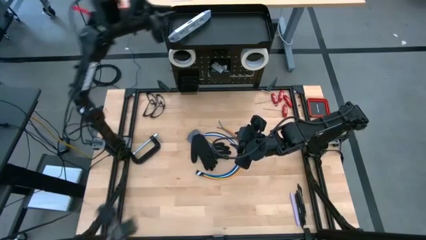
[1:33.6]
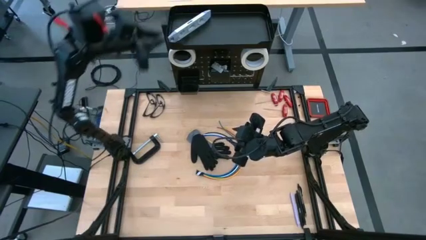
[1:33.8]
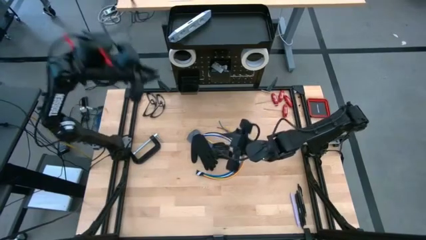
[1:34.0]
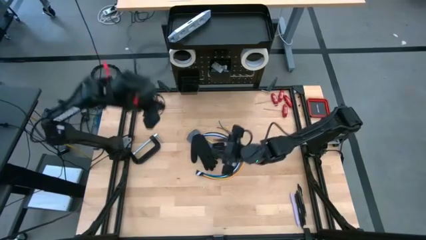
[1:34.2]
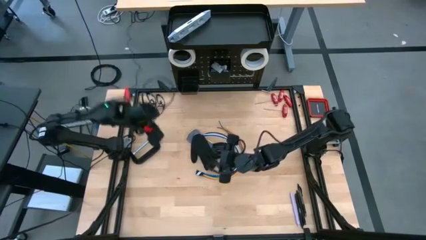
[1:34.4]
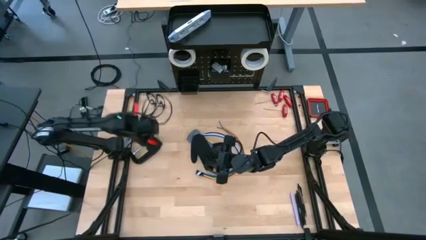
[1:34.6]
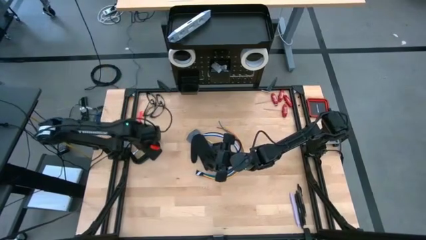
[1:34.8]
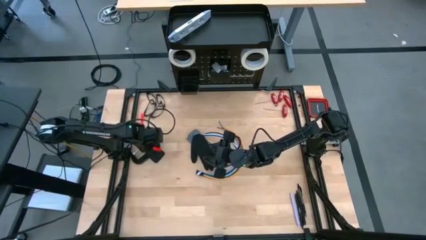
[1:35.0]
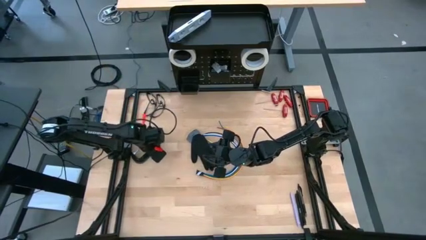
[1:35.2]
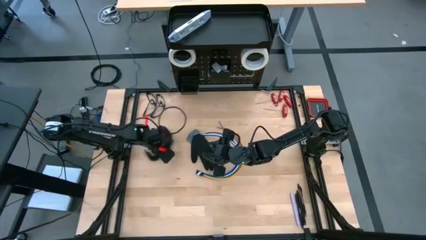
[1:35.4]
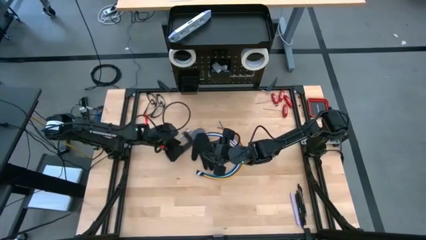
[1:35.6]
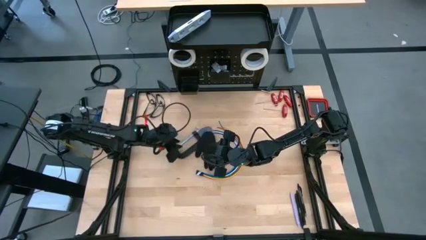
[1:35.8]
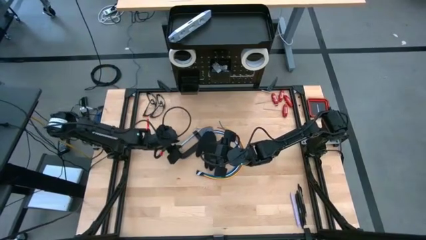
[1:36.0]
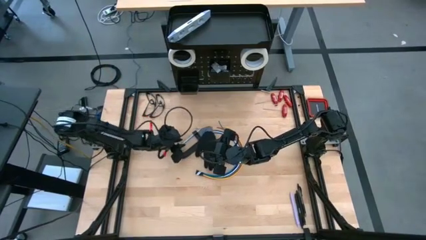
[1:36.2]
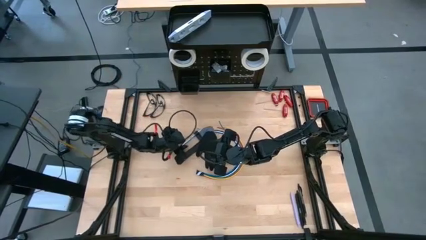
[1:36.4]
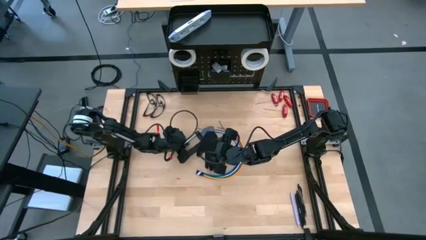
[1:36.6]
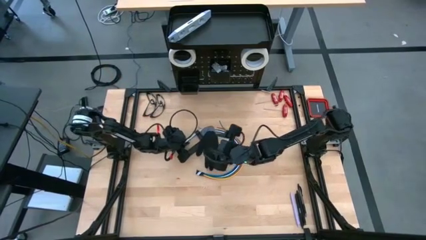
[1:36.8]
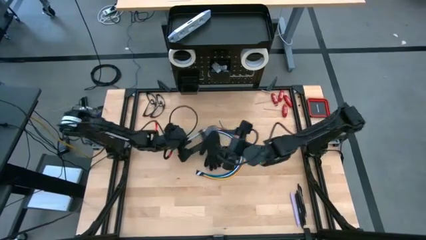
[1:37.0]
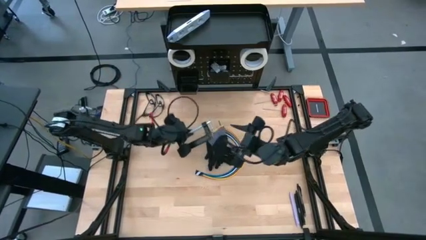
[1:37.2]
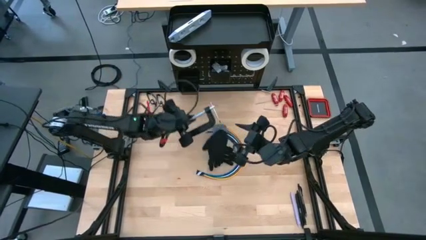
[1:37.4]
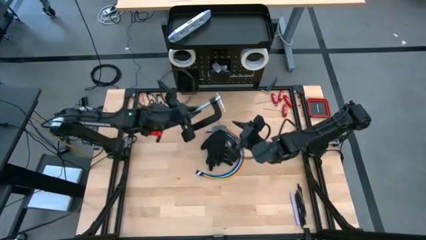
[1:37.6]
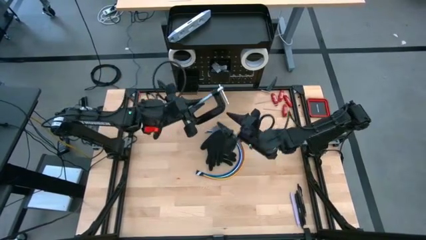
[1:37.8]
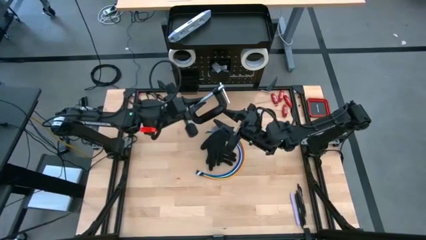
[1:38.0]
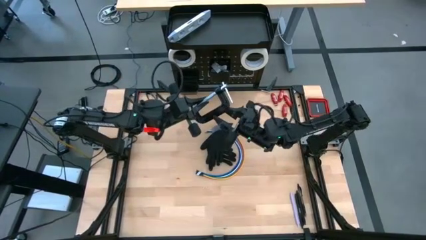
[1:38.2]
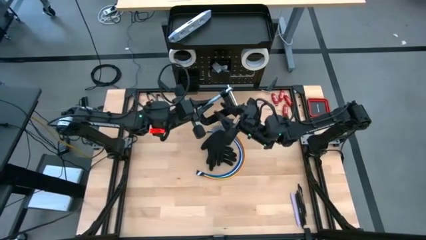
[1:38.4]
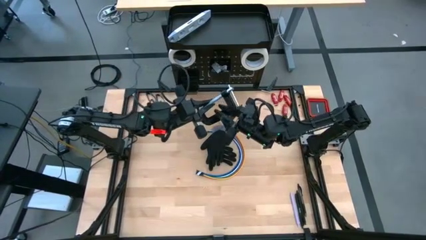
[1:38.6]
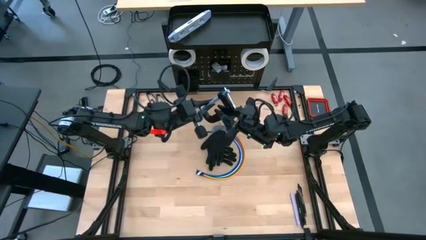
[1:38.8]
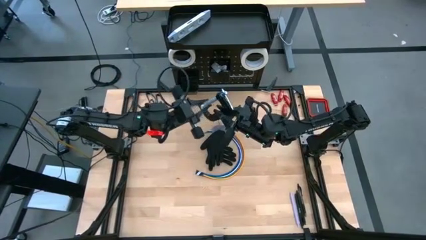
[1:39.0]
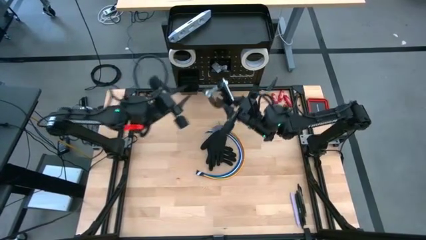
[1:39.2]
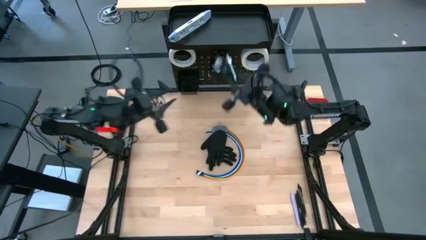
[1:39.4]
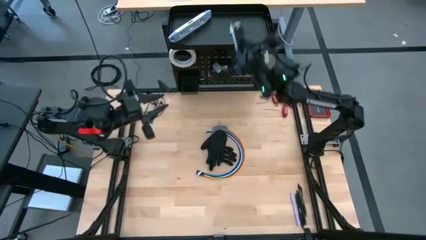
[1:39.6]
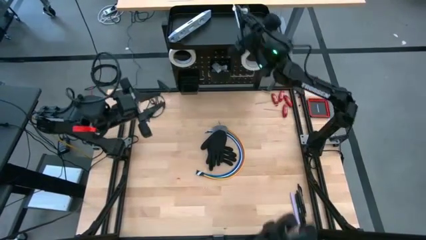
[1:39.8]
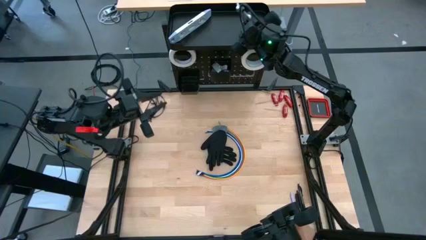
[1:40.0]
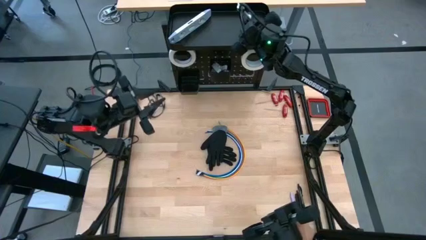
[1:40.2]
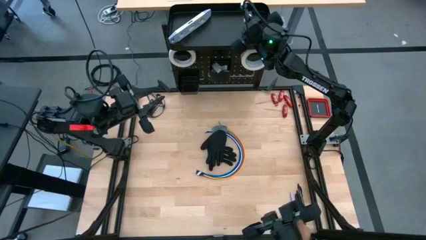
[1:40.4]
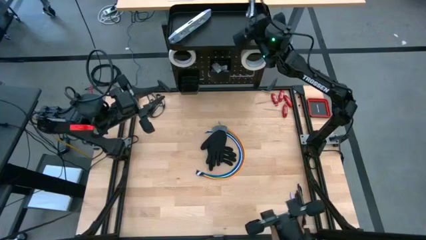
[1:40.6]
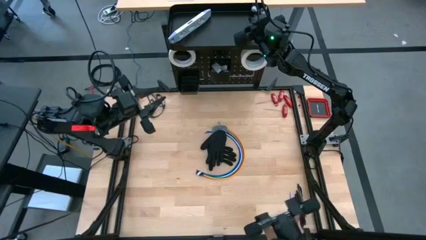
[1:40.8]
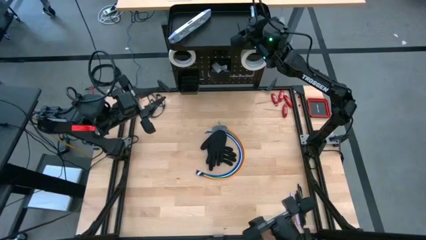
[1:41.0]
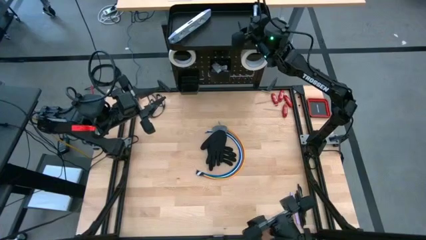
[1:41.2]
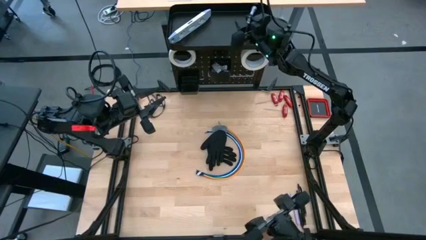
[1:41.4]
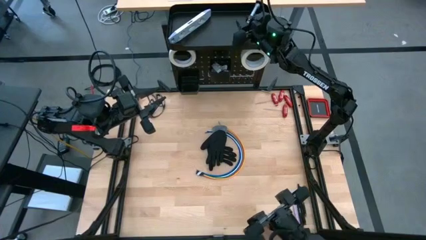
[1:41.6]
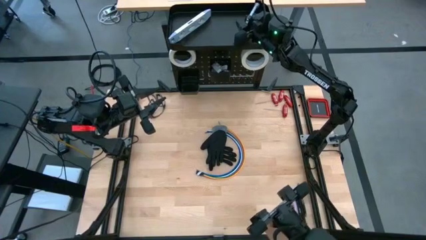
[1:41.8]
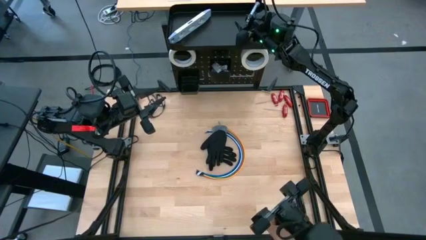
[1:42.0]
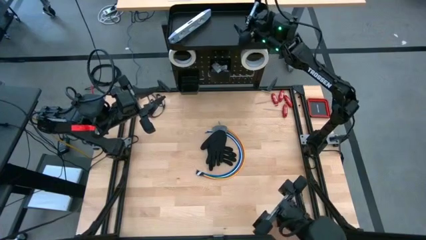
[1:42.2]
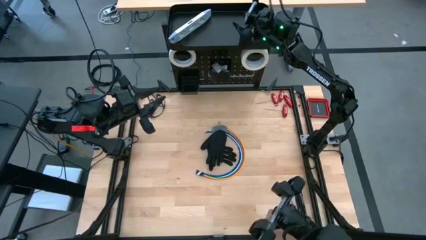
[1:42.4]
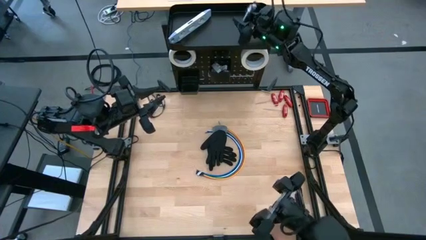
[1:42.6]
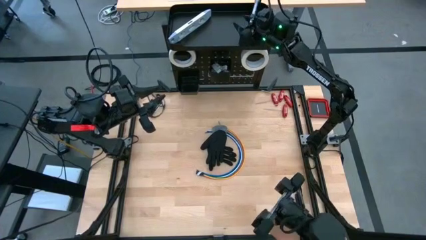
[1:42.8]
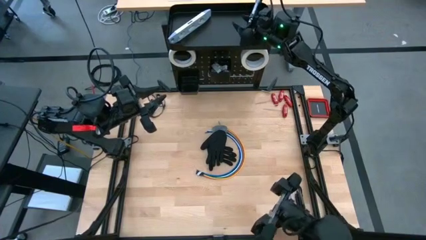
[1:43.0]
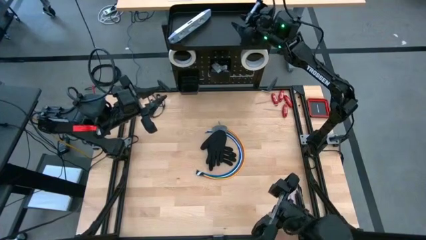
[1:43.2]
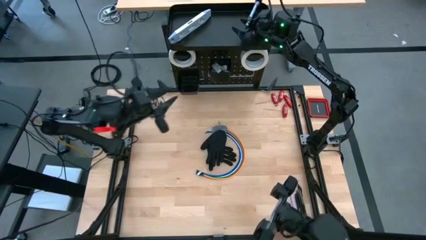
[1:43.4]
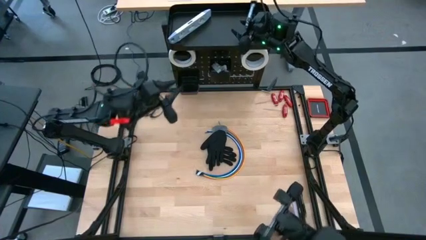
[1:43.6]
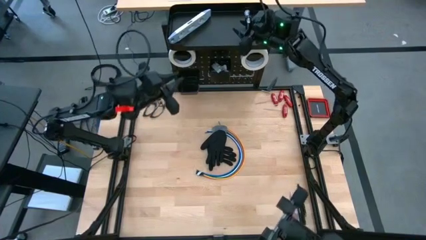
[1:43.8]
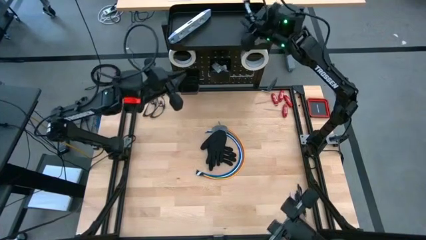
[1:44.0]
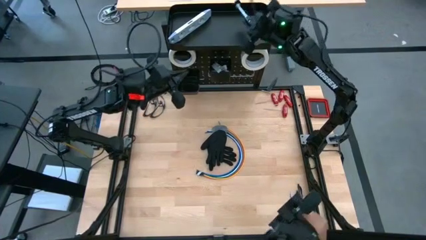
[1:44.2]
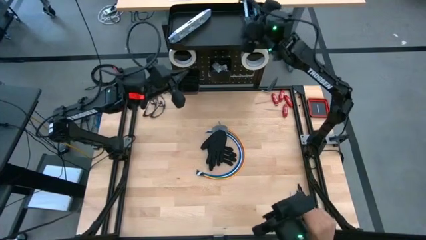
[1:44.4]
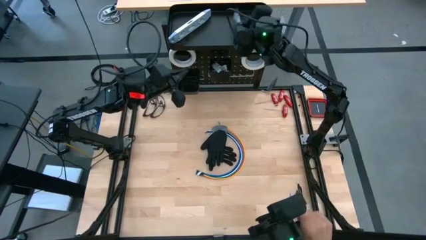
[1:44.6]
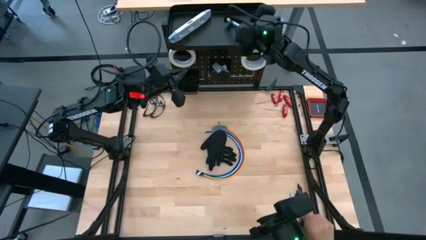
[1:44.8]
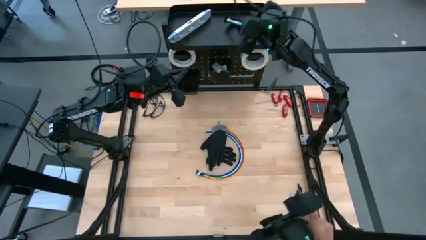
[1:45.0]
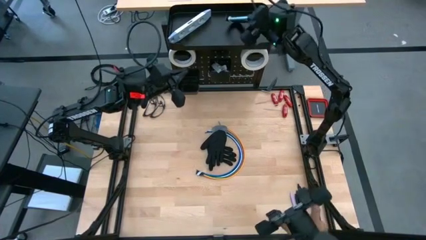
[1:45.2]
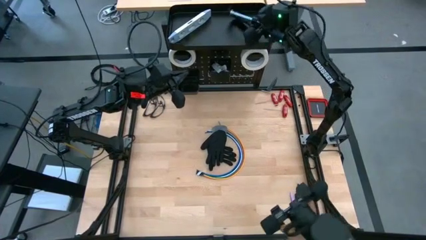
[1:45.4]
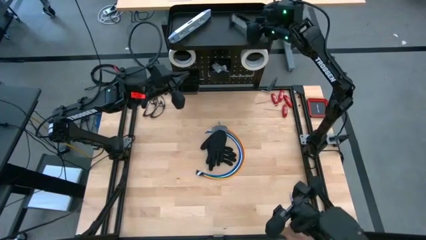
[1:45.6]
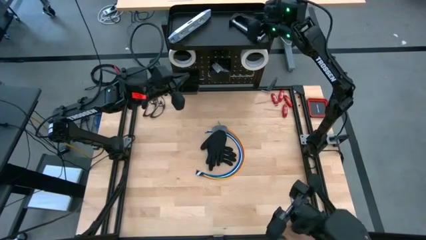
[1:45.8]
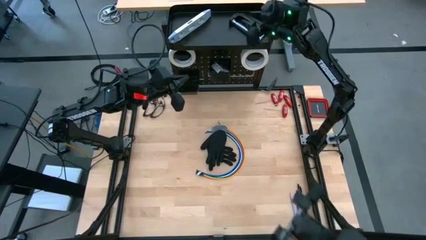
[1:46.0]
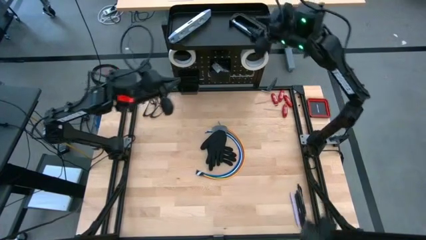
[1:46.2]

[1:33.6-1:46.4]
Task: Hang tools onto peg board
Put the black clamp on the peg board

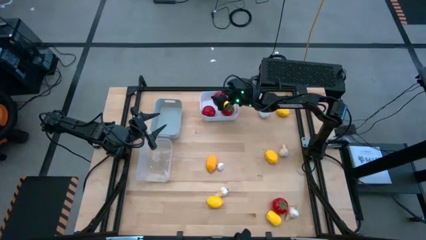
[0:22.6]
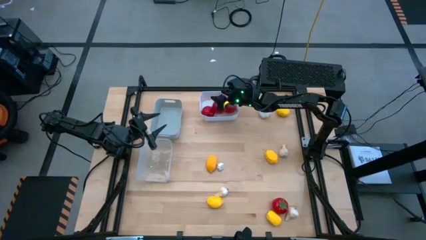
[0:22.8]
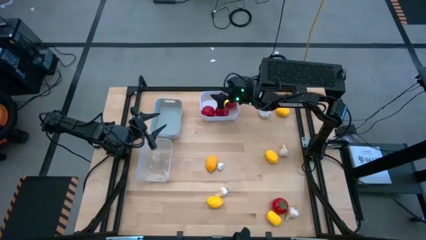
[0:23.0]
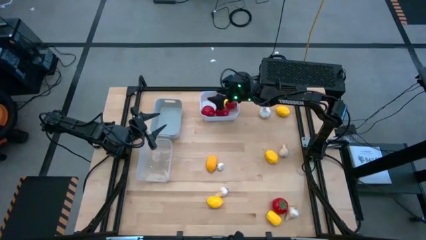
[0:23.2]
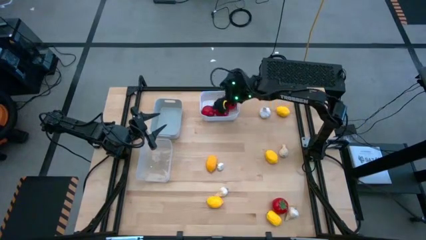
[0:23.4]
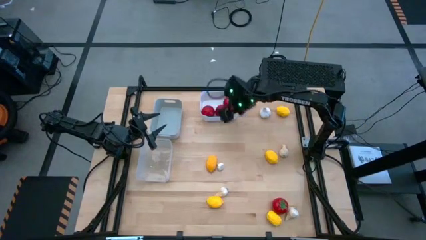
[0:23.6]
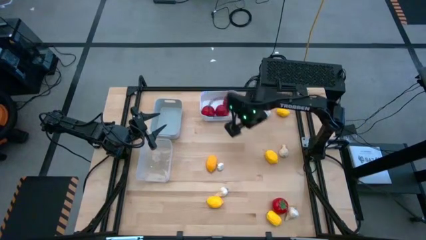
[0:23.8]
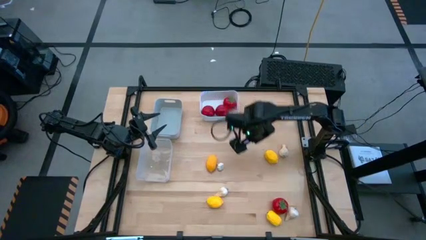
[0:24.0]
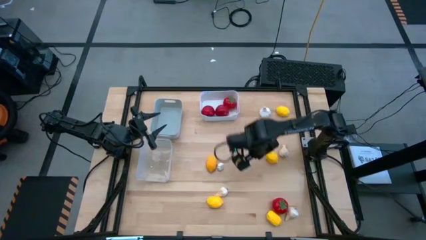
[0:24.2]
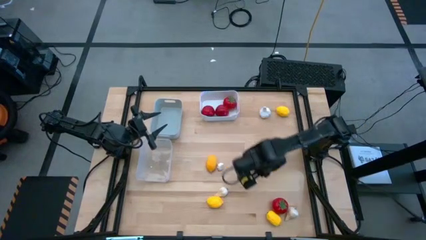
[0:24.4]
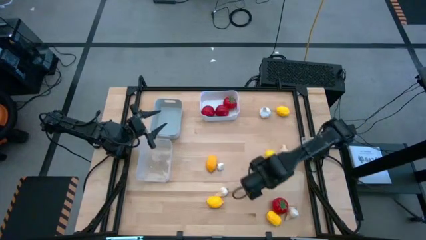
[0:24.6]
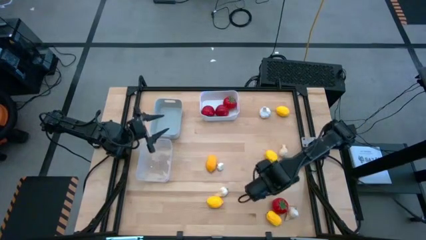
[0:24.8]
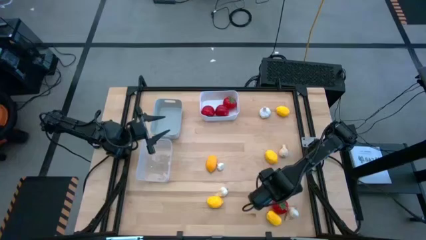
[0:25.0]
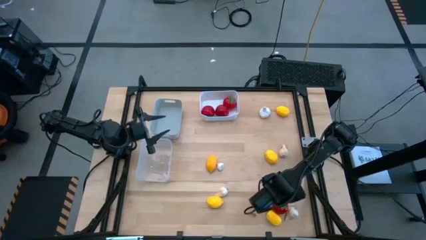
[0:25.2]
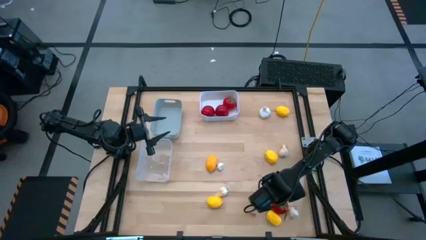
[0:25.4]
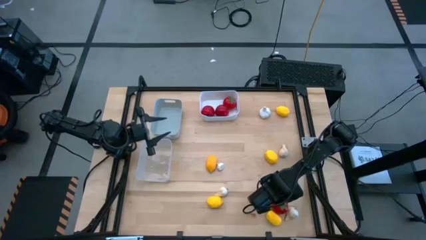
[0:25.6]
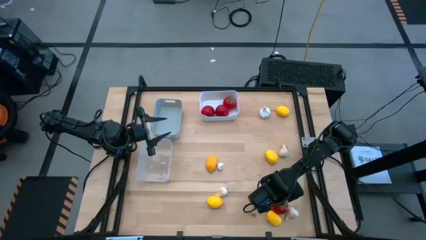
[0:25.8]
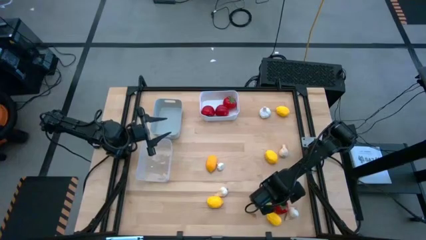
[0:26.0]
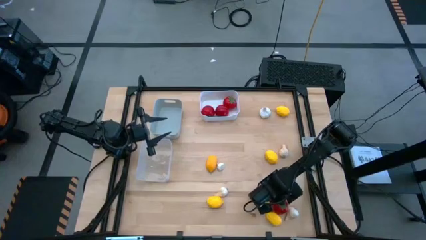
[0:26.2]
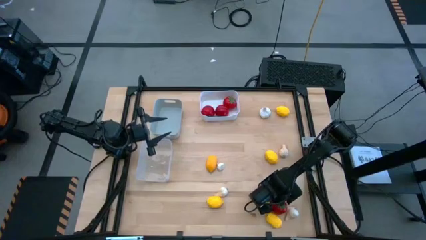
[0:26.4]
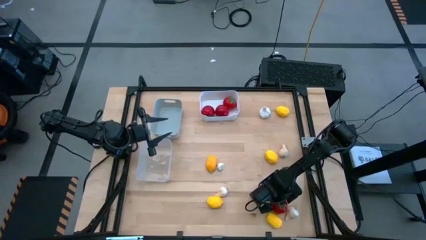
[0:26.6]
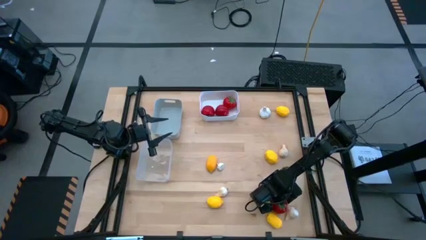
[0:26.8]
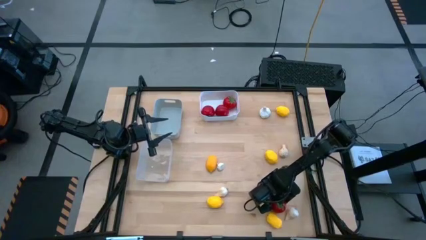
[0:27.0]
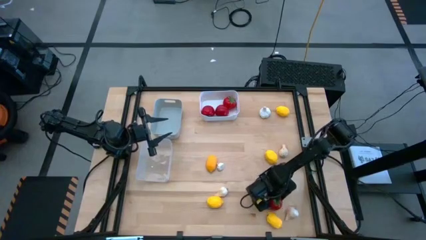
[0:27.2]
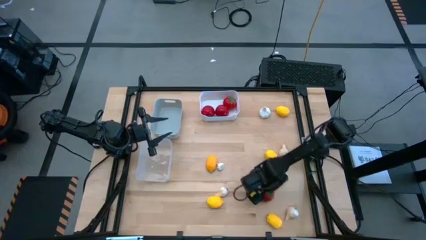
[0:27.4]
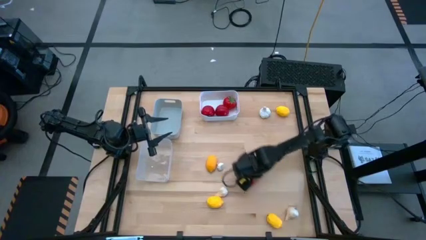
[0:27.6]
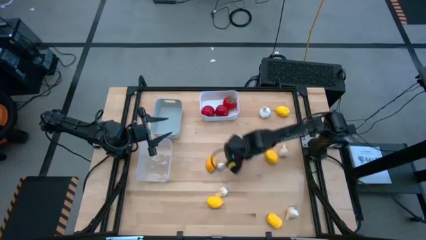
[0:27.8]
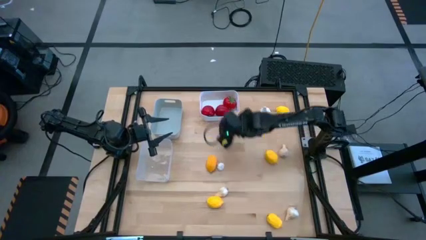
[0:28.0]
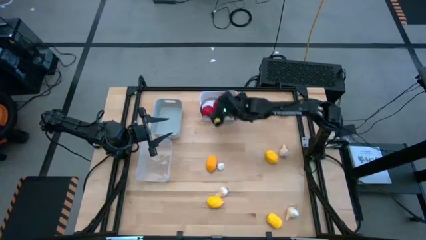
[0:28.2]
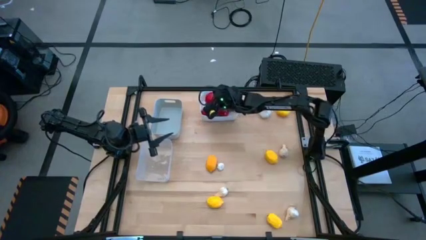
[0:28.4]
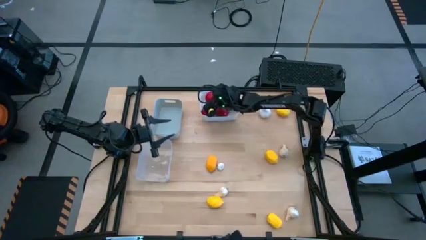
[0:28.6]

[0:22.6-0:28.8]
Task: Sort produce into baskets
Put the red tomato into the white bin
